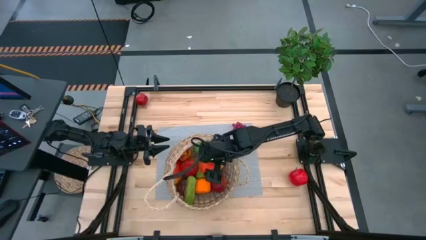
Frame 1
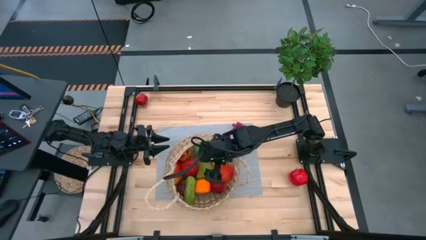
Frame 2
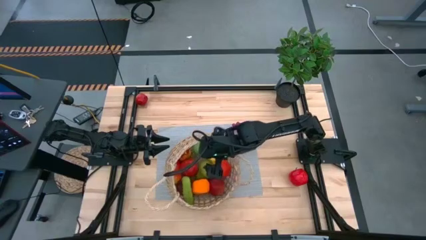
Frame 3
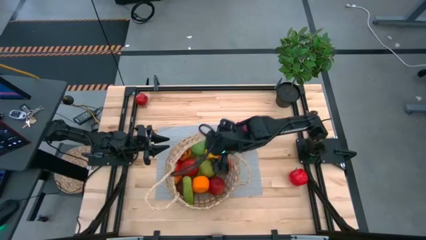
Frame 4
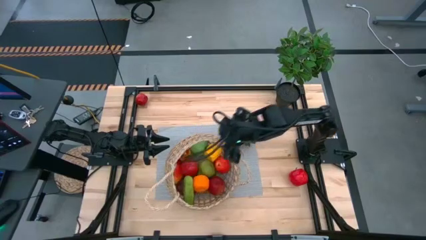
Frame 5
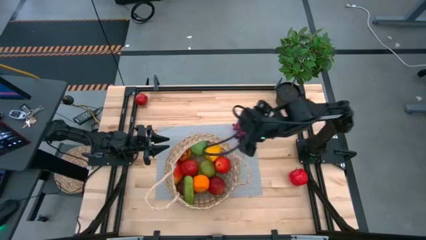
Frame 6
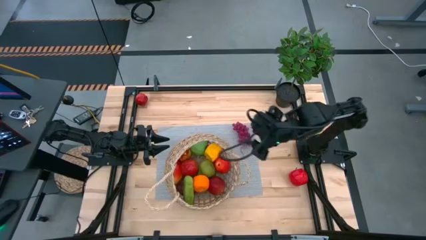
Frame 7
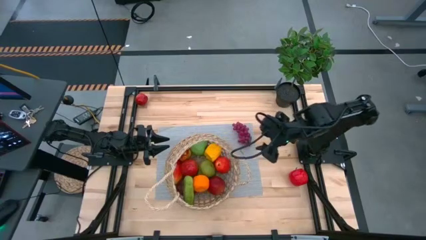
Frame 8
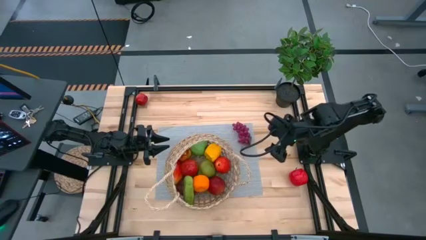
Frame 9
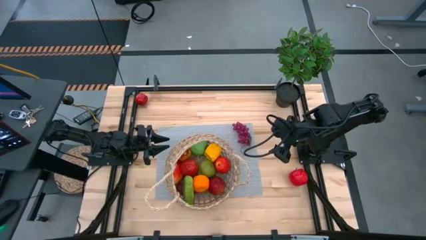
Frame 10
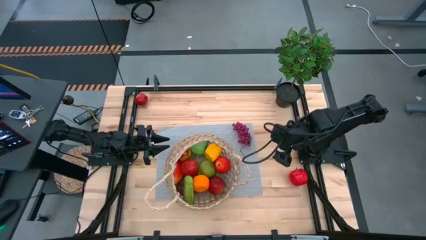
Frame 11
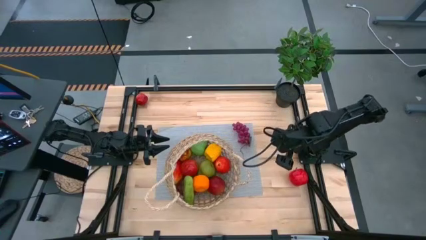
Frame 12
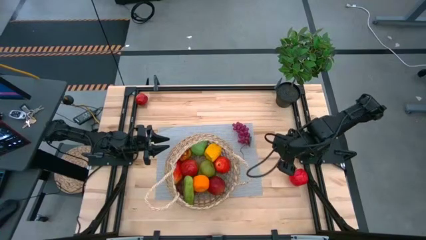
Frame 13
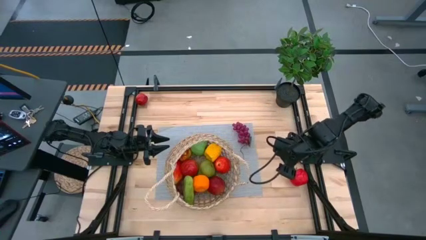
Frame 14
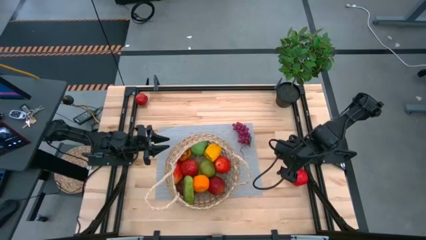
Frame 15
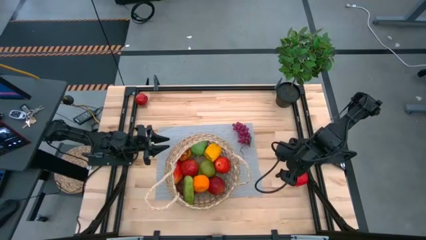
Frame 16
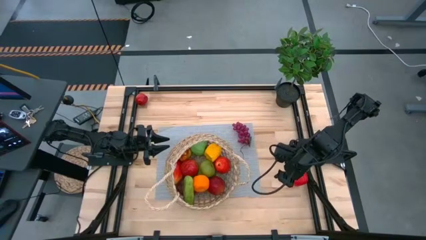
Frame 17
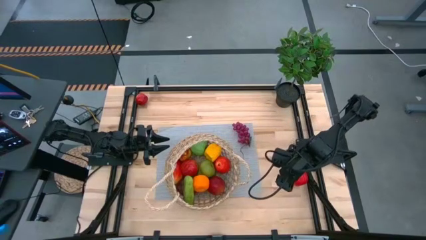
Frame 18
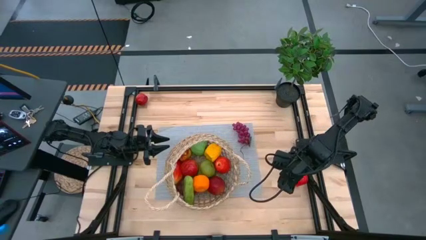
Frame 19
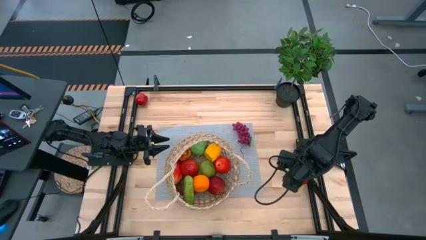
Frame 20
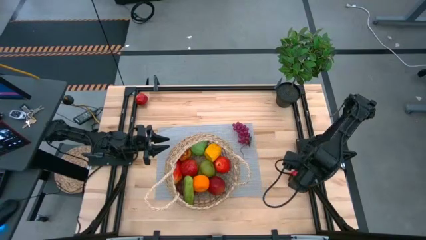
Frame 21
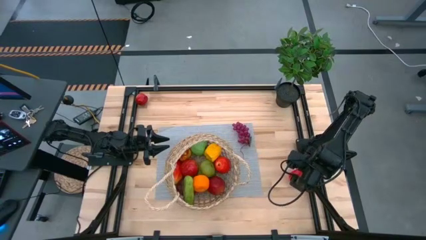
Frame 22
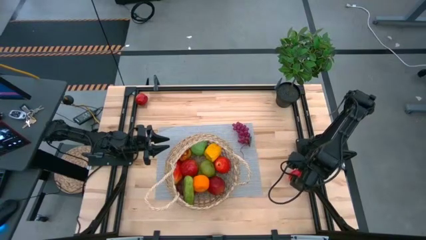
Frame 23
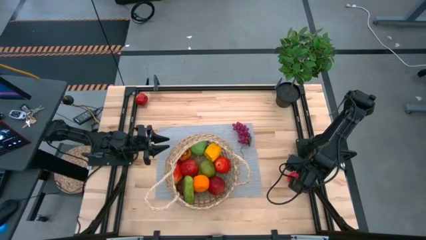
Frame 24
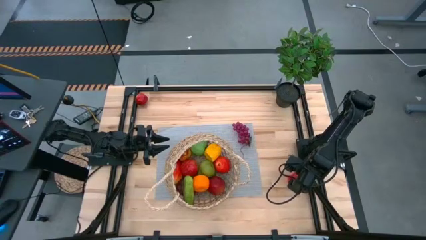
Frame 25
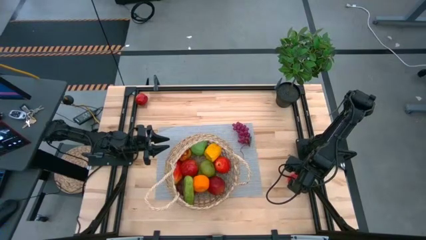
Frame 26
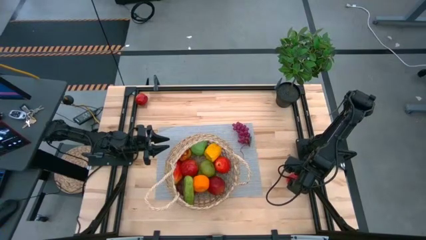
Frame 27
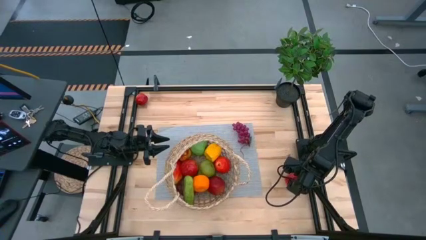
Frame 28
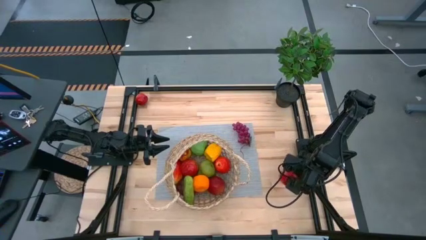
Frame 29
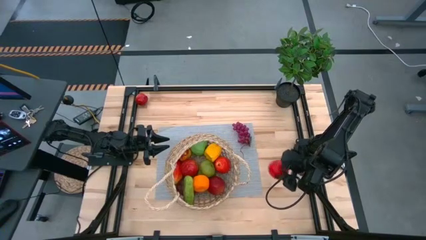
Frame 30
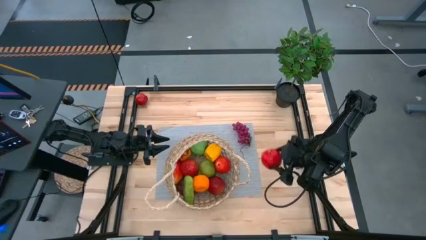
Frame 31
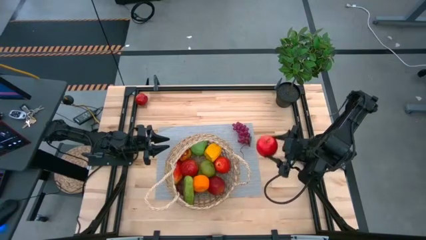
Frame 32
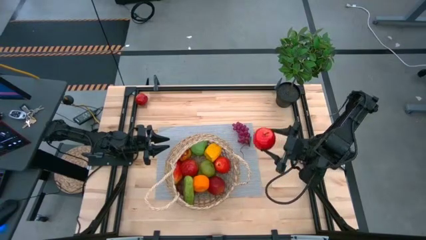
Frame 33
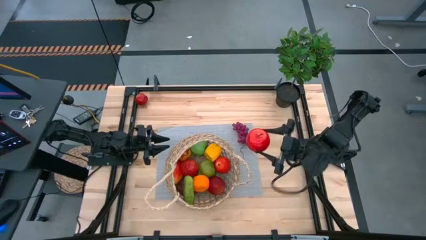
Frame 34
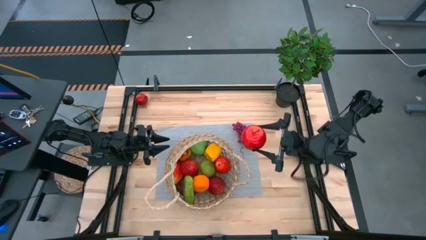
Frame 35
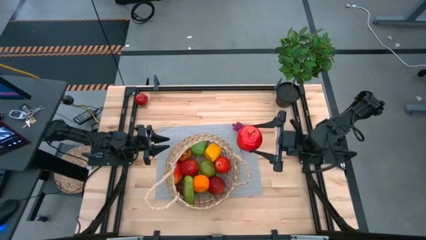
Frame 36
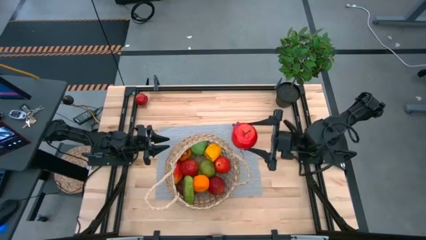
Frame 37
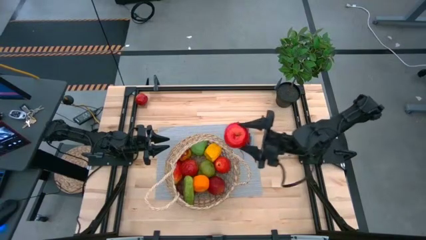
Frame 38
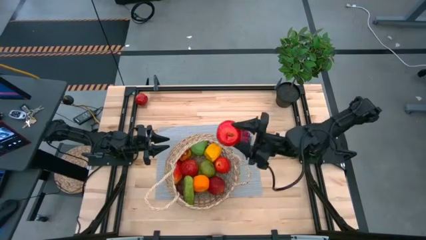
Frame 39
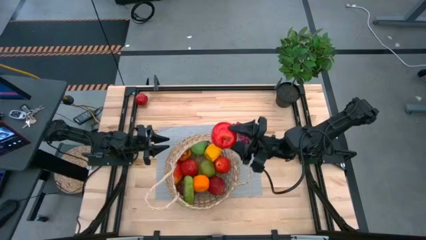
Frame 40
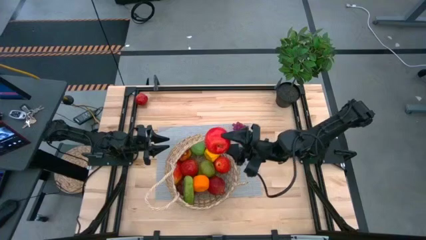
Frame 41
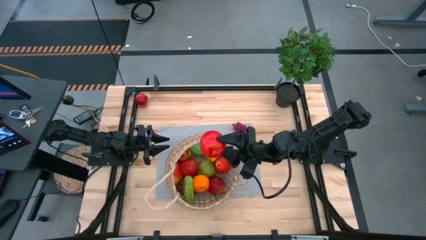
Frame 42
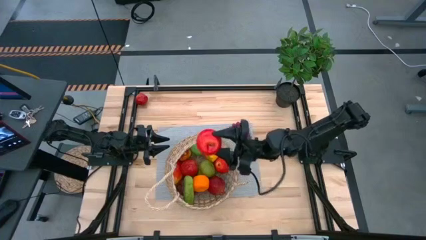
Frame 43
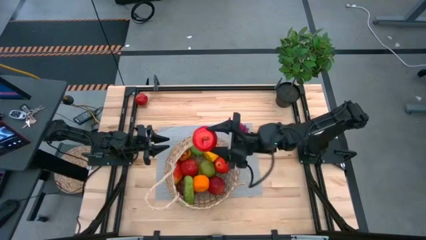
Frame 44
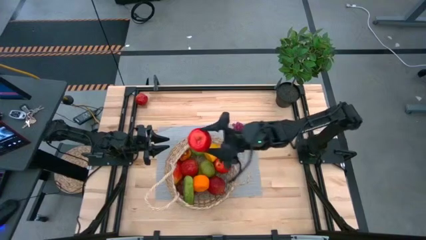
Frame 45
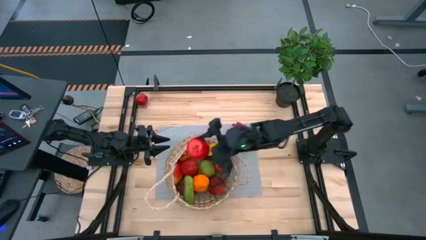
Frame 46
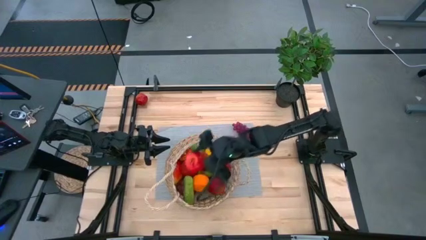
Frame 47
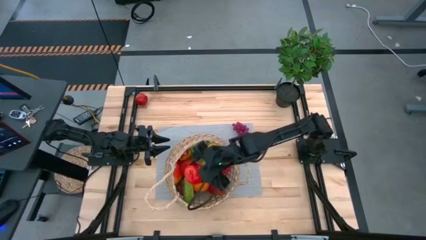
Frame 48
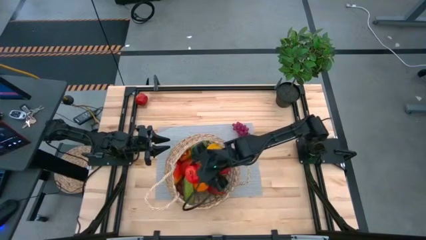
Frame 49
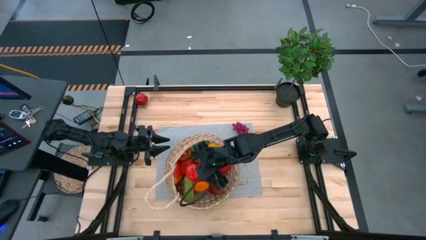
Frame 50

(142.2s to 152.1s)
Task: Build produce basket
Put the right red apple into the brown basket

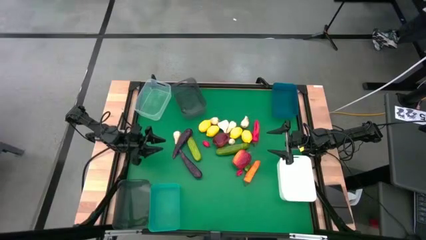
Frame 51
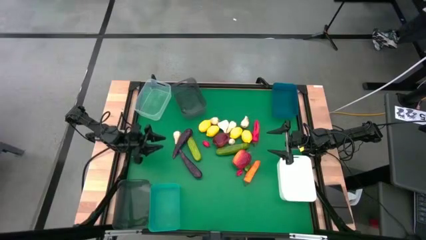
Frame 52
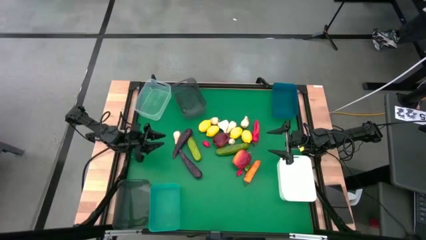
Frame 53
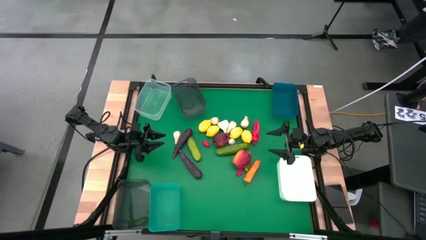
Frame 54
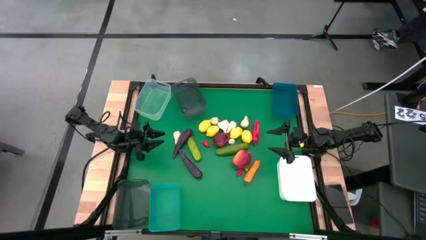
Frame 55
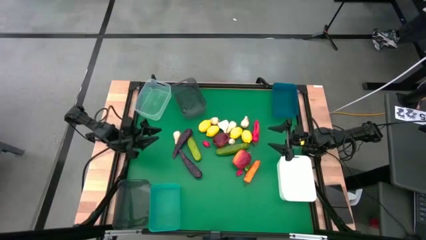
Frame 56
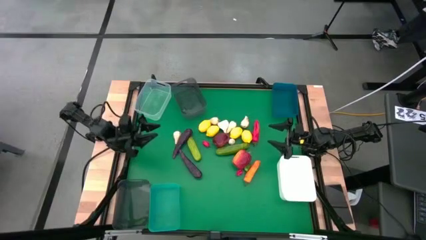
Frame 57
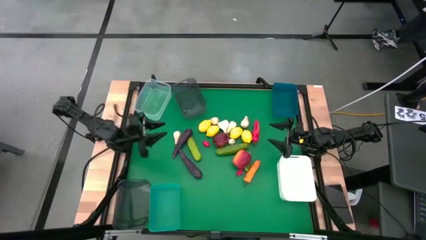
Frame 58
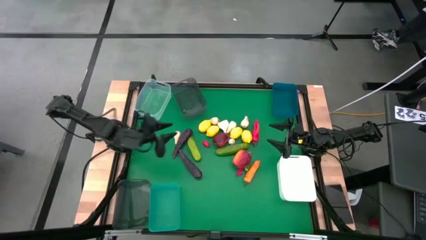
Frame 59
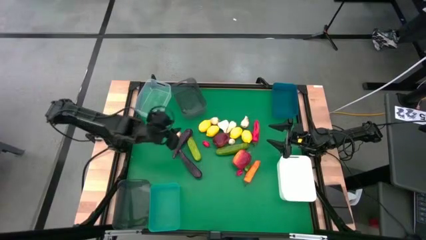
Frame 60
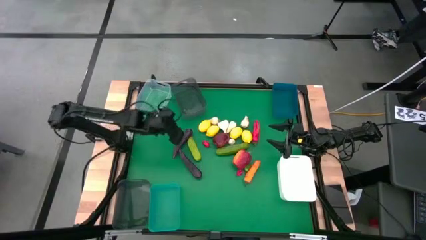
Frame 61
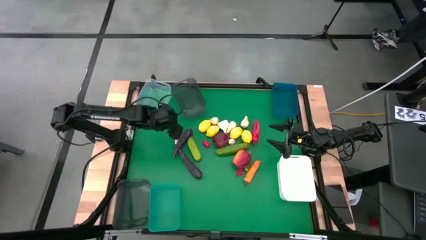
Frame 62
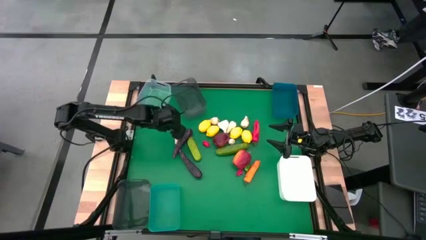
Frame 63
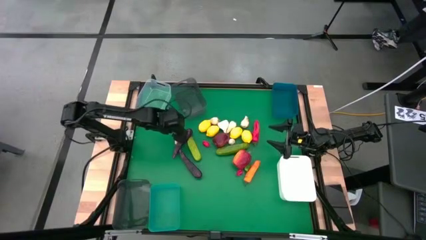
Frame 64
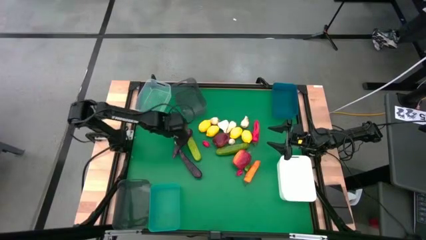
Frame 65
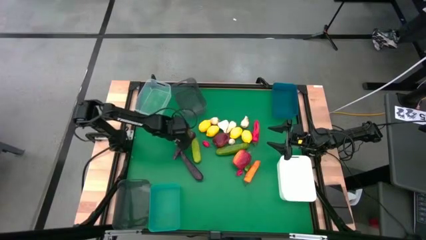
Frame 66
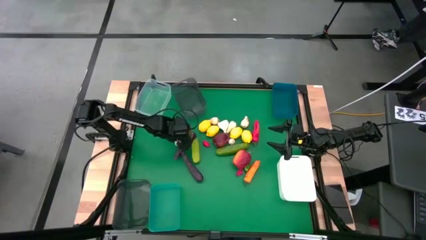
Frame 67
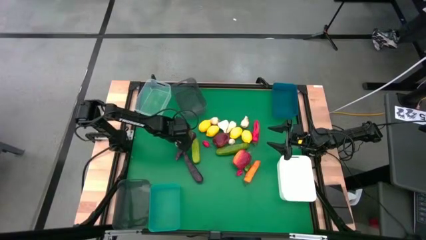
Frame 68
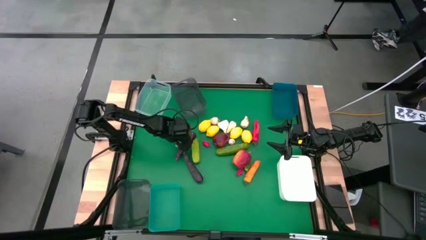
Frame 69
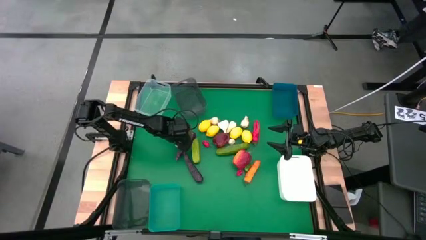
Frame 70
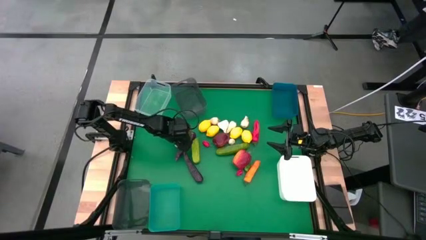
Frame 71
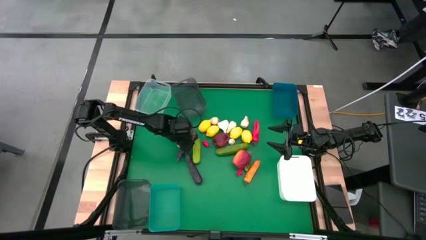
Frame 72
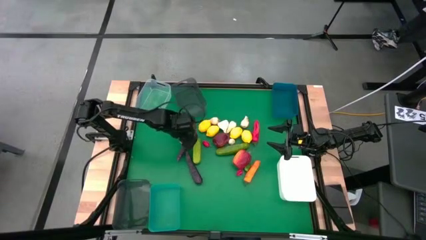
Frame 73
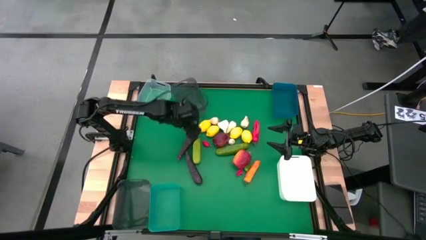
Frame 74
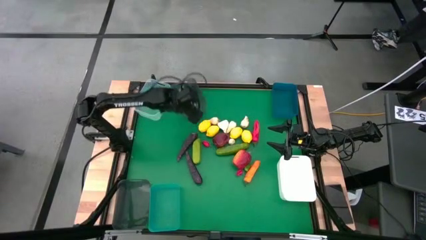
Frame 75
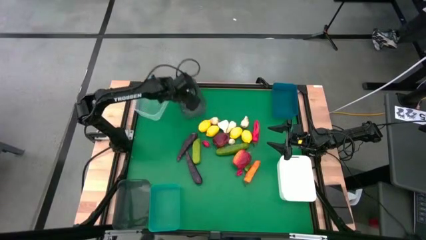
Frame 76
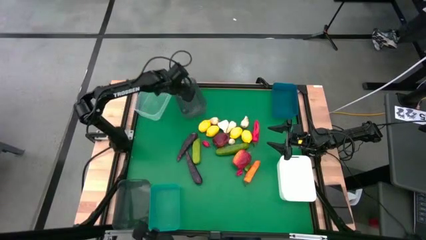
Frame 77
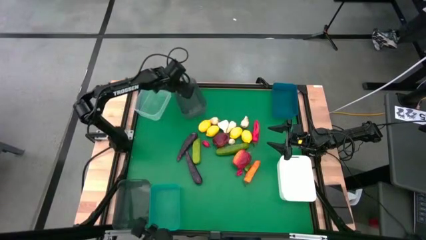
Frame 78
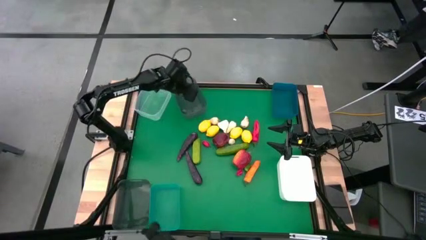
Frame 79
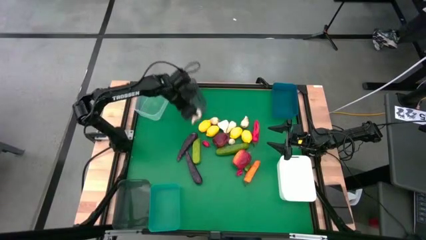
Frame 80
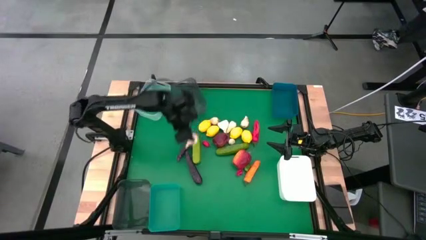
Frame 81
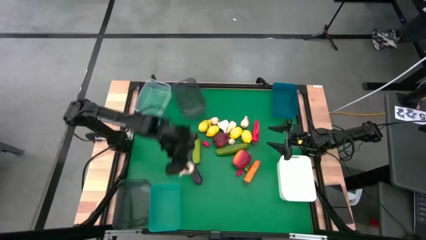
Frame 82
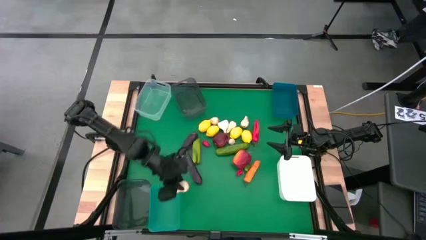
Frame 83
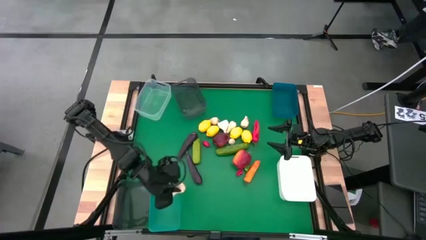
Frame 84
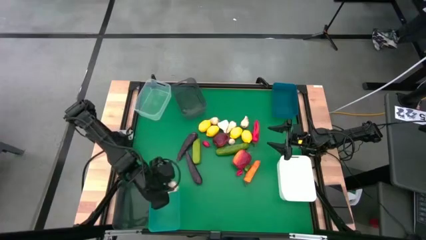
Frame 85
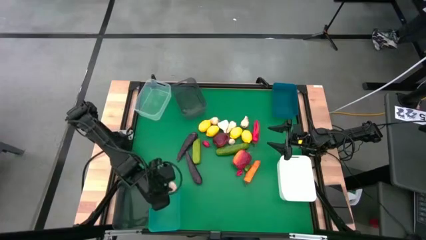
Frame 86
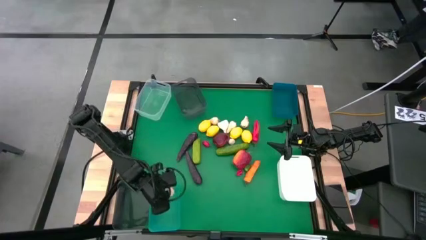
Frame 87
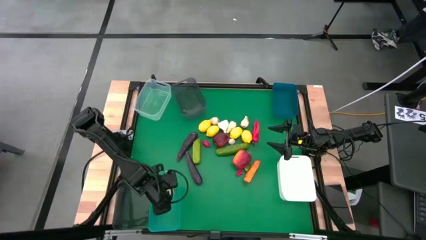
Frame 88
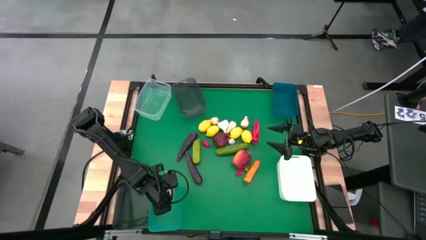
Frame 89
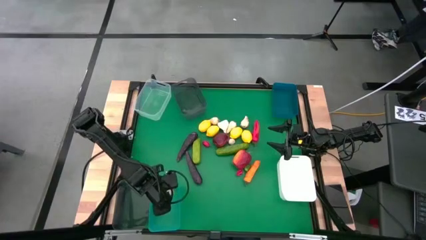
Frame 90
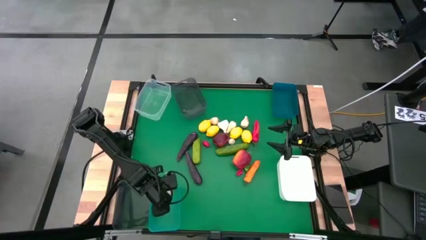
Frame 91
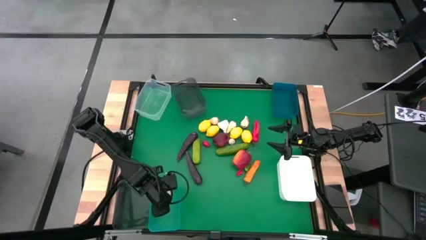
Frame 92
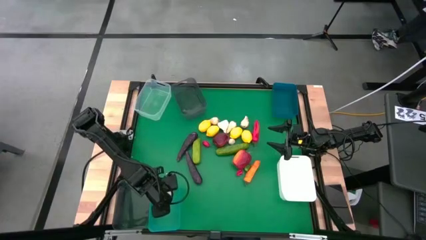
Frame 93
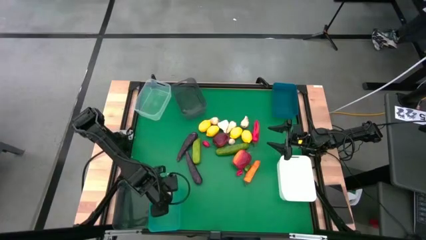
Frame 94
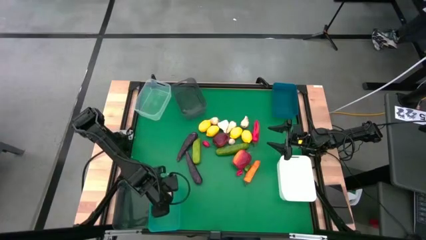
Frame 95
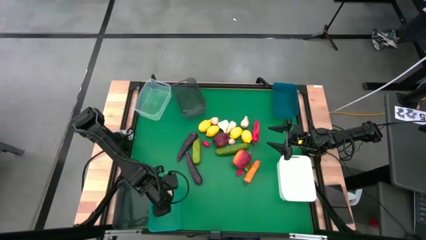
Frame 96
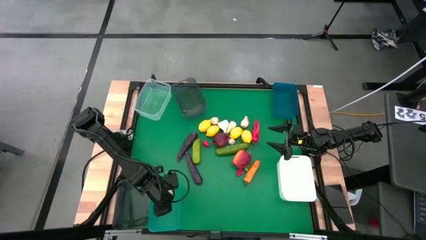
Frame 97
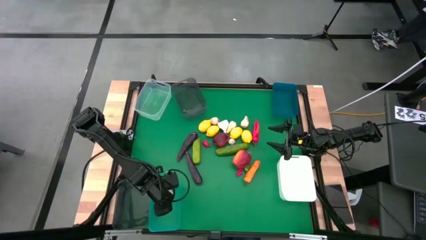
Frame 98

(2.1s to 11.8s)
Task: Sort produce into baskets
Put the garlic into the green bin
